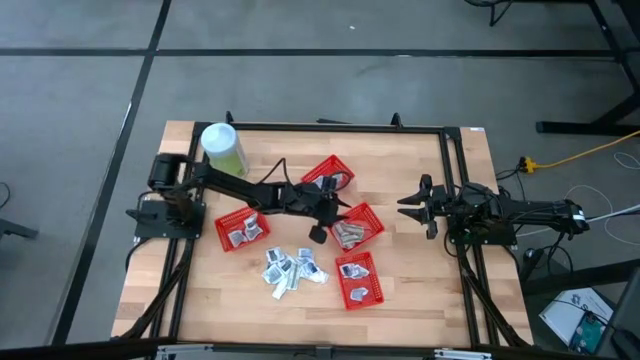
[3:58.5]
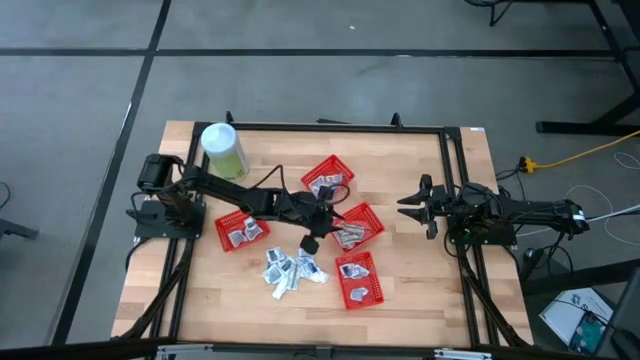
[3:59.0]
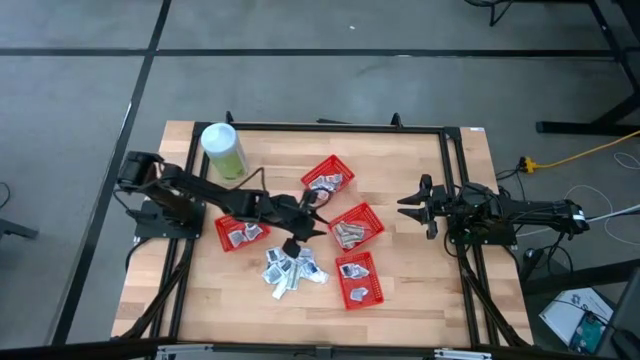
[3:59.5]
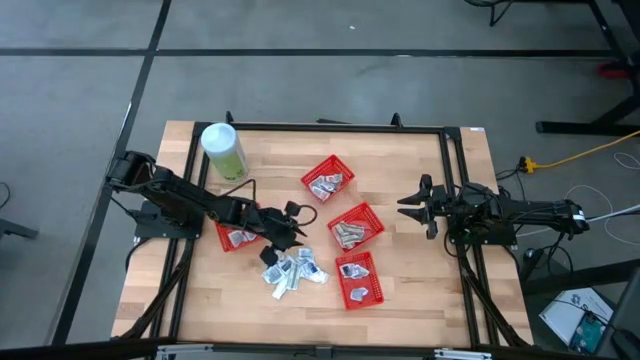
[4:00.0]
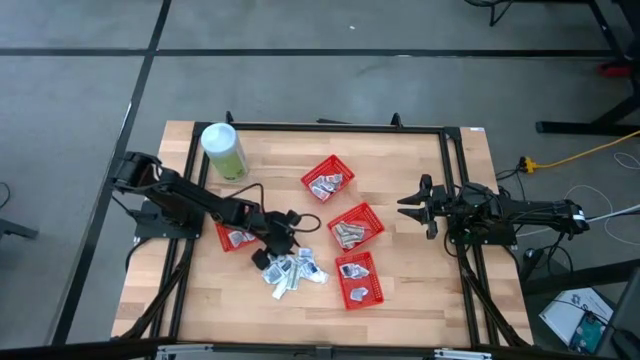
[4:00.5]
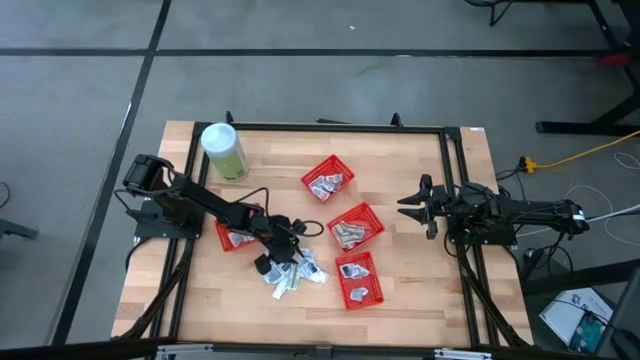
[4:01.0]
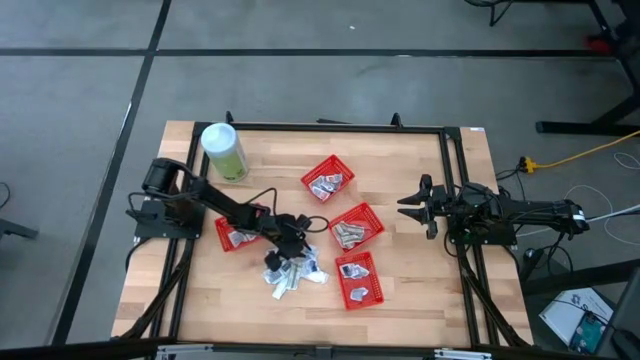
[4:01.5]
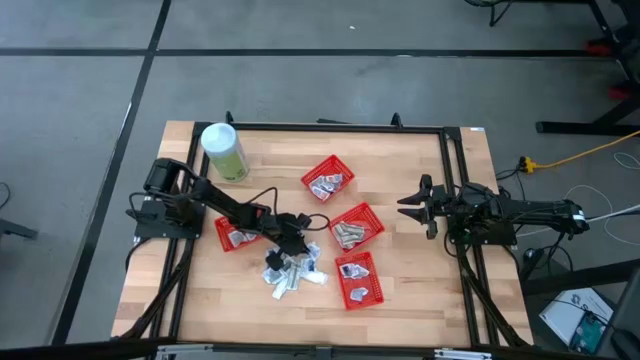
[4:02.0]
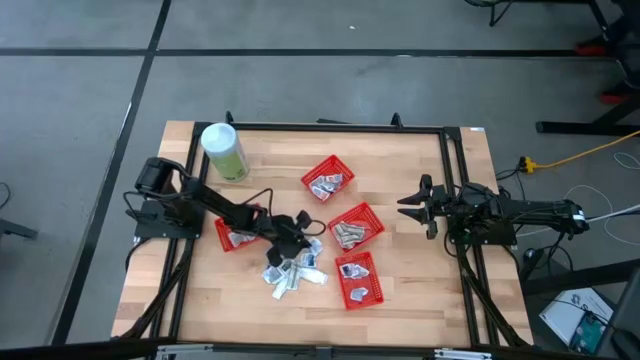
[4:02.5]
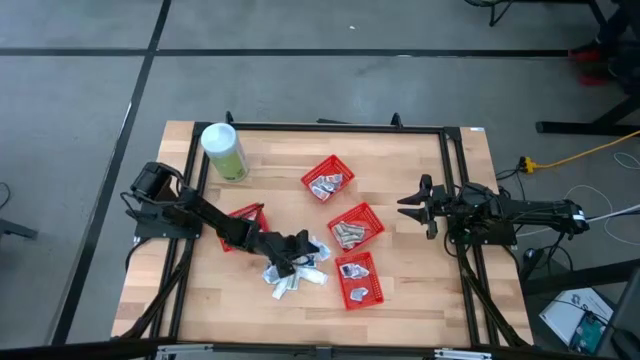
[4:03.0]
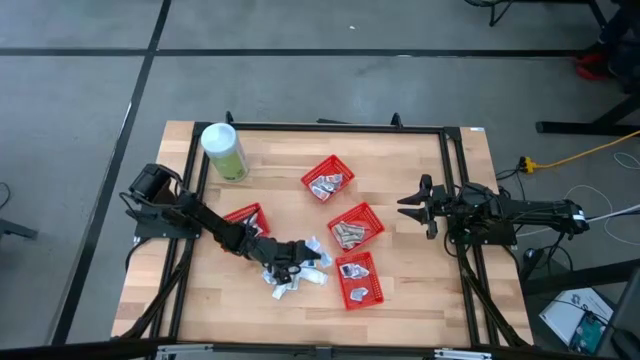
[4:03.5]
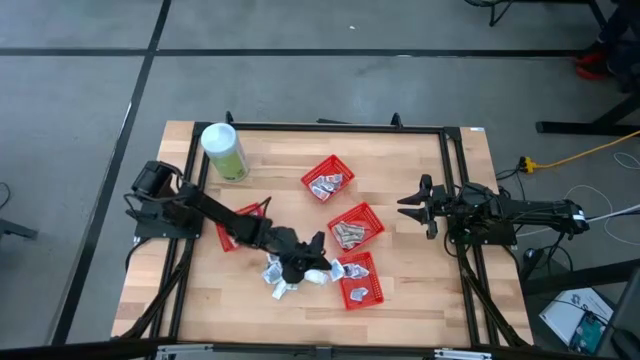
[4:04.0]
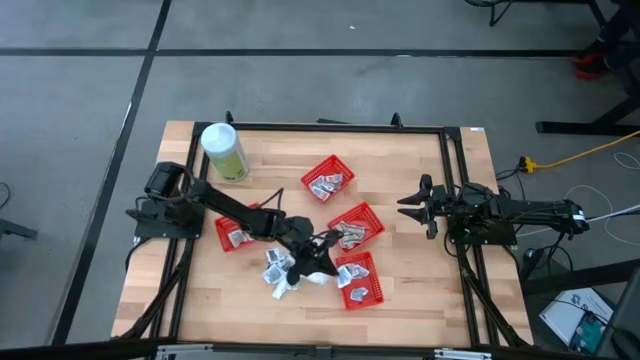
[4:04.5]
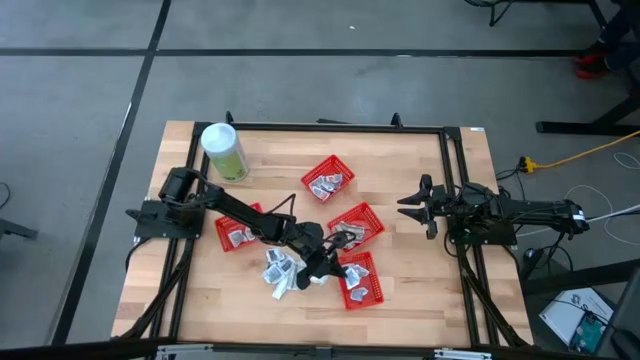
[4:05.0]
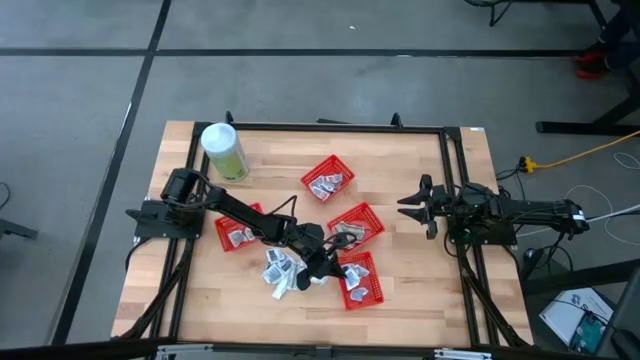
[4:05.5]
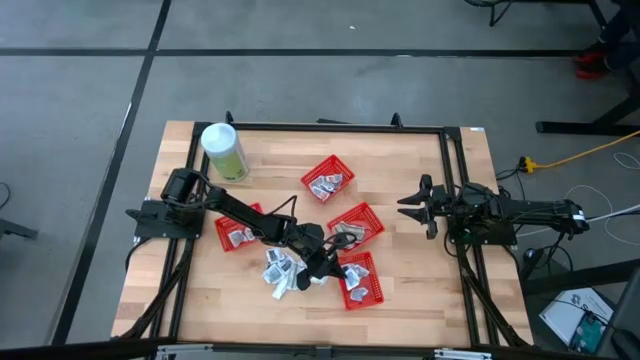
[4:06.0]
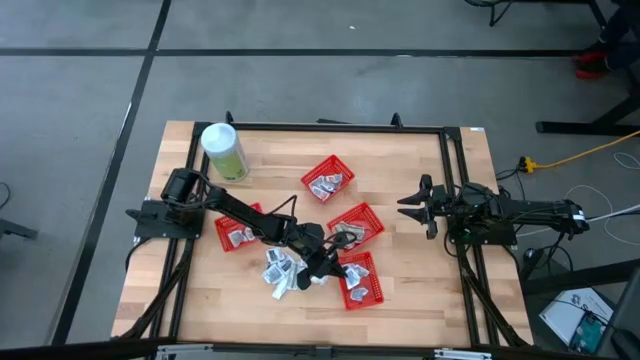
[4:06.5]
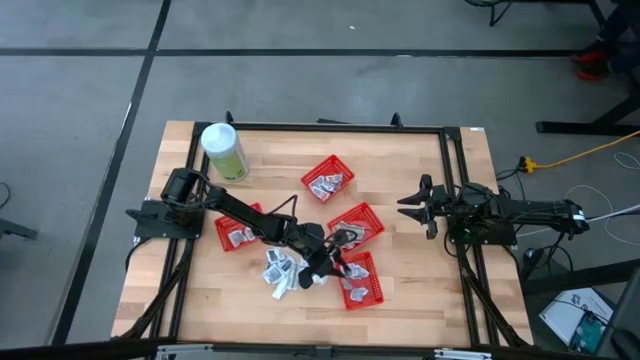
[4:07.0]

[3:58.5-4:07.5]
Task: Pick & Place First Aid Supplies
Put the blue alcohol pad into the red container

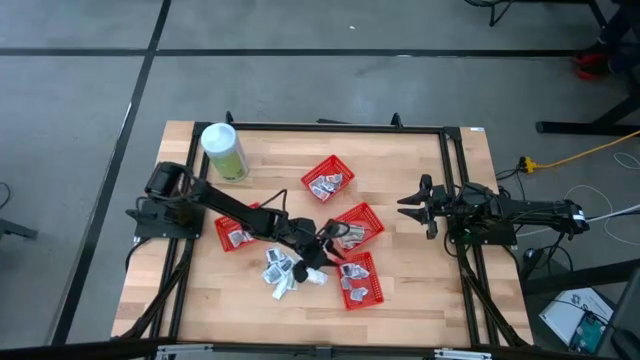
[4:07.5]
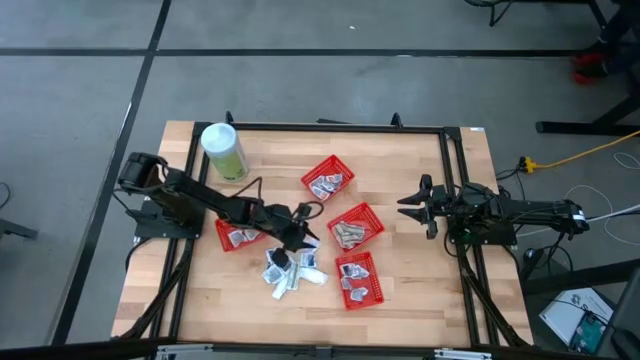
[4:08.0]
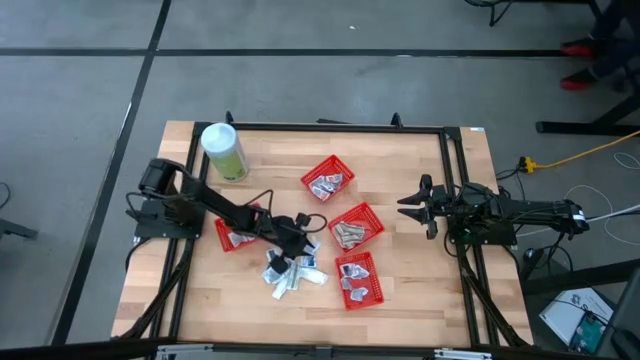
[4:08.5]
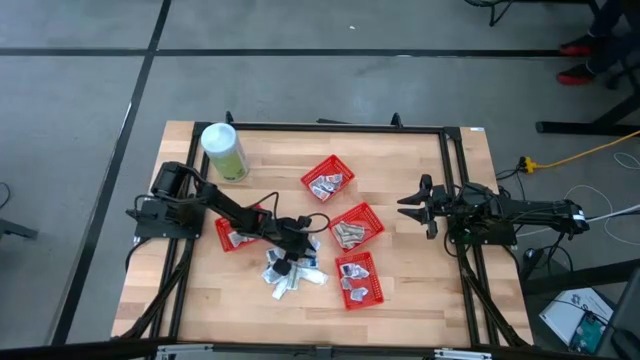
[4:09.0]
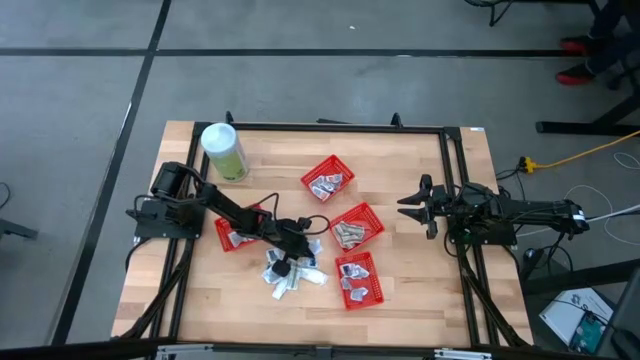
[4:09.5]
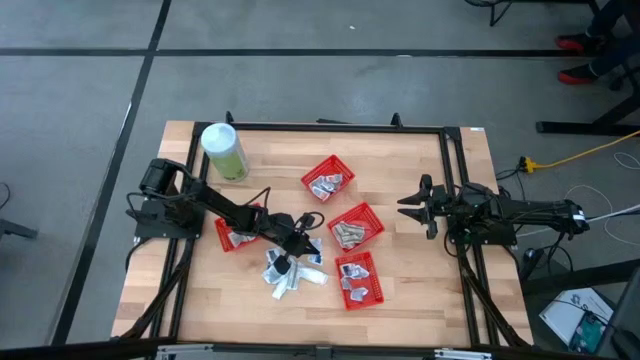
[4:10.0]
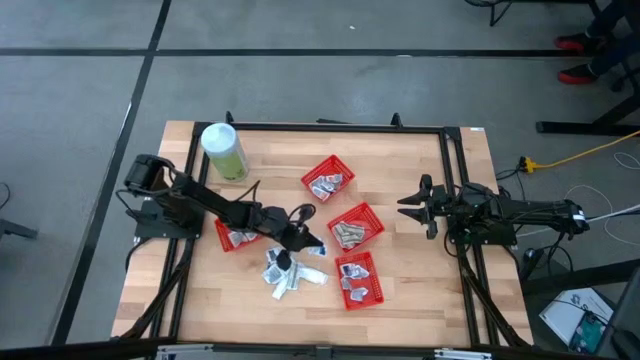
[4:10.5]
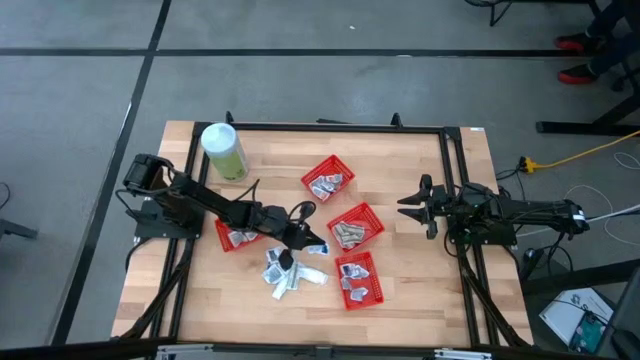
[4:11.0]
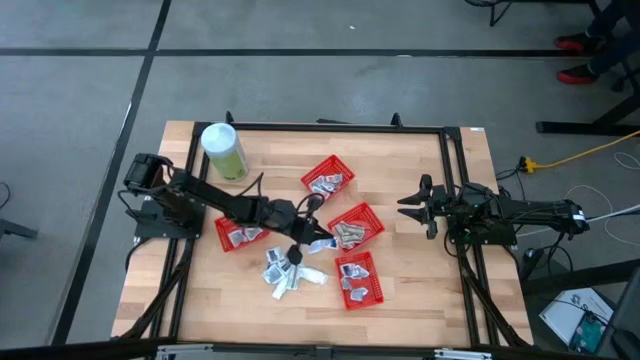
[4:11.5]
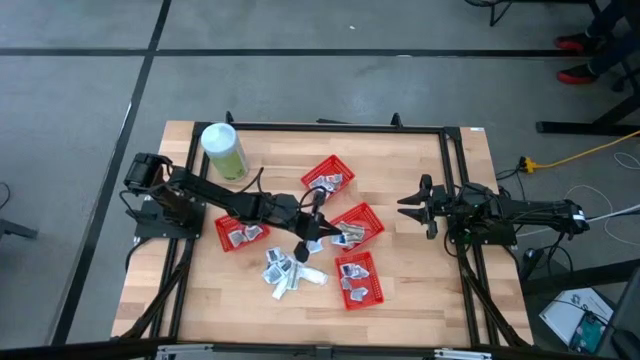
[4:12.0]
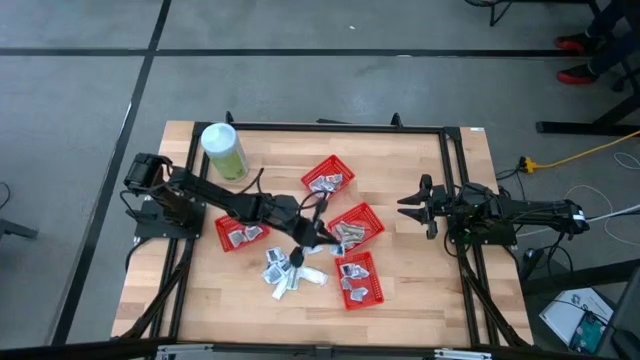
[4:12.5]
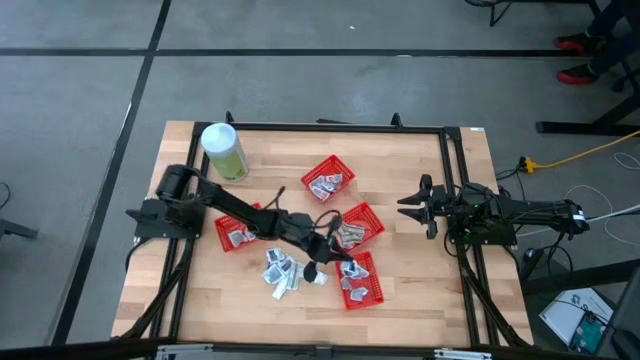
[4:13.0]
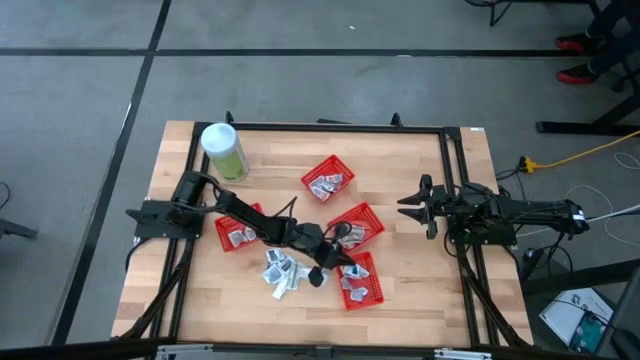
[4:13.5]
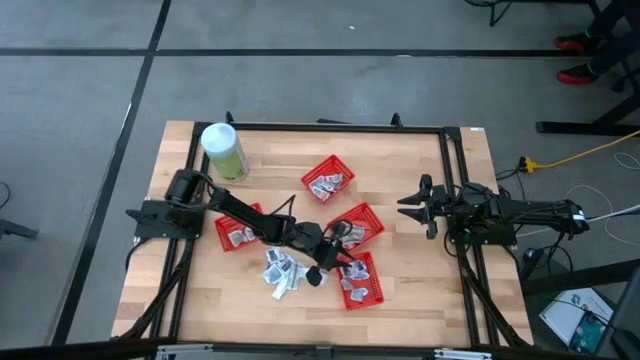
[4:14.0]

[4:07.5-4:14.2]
Put the blue alcohol pad into the red container

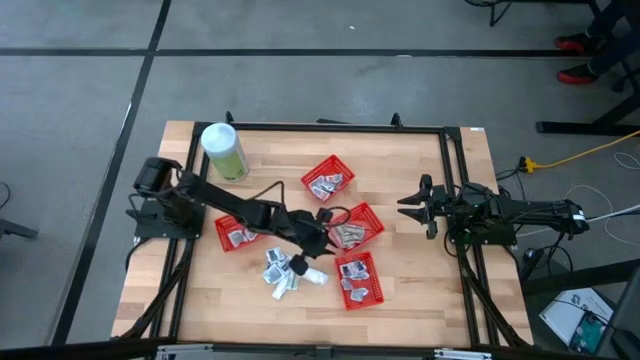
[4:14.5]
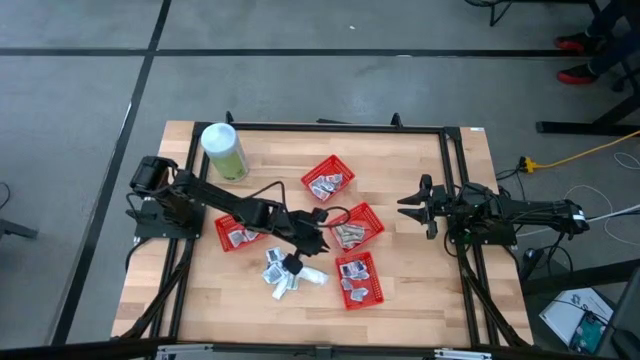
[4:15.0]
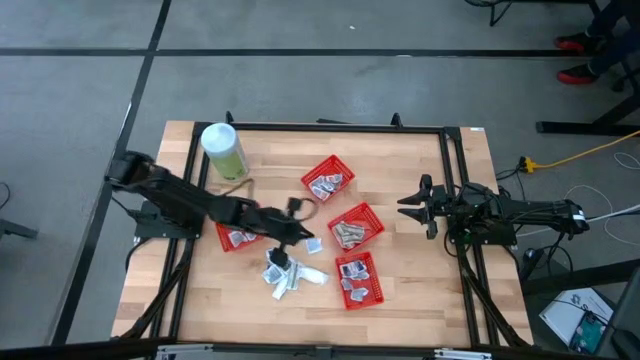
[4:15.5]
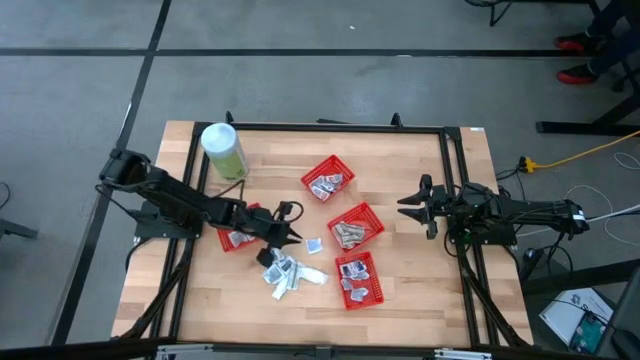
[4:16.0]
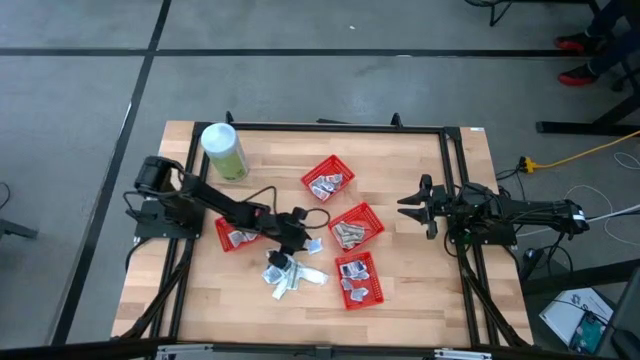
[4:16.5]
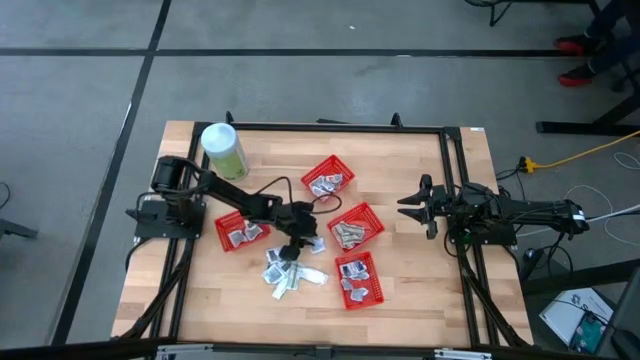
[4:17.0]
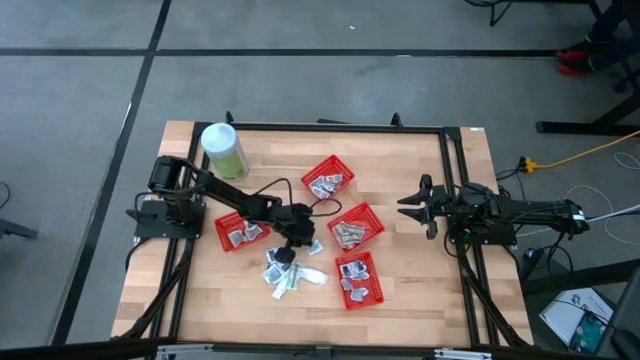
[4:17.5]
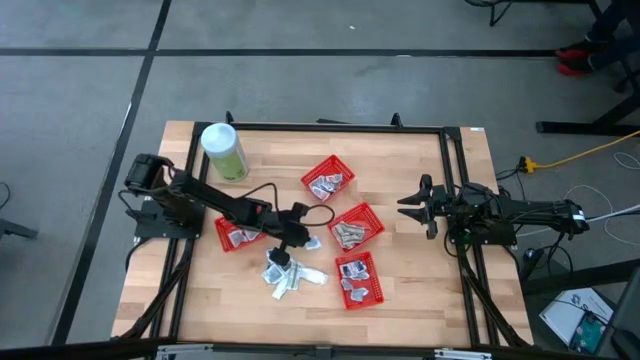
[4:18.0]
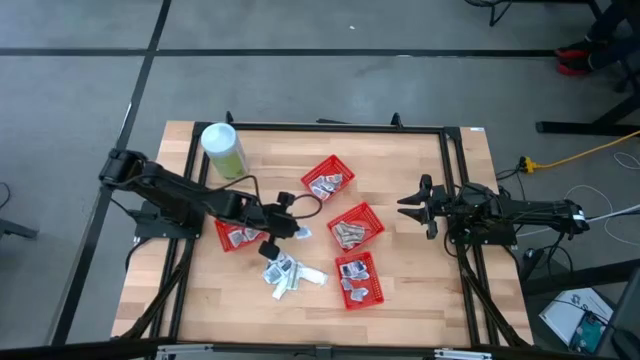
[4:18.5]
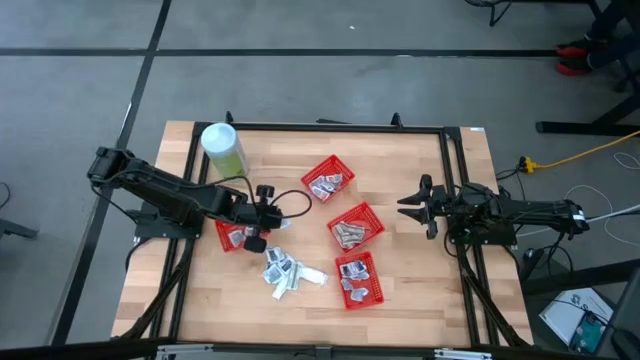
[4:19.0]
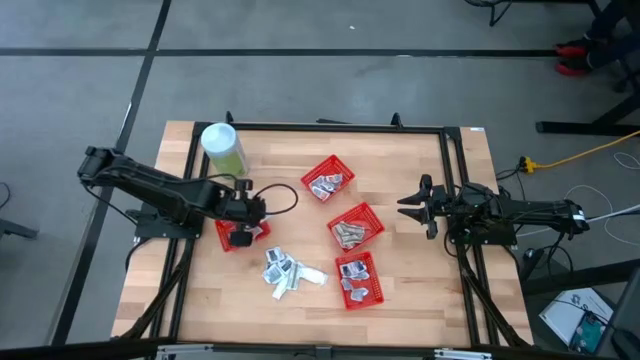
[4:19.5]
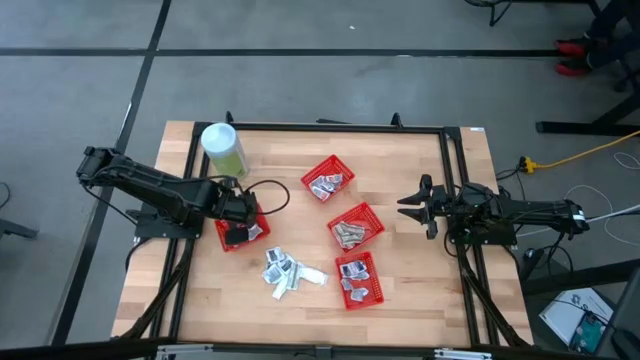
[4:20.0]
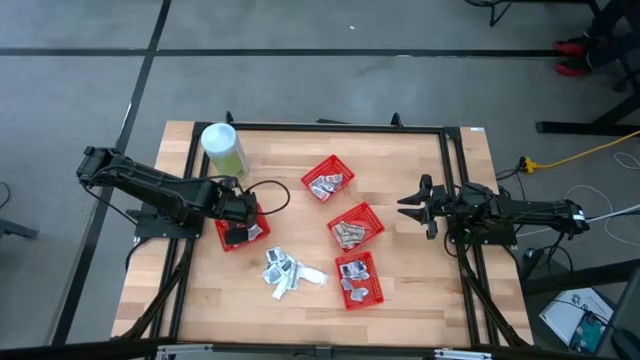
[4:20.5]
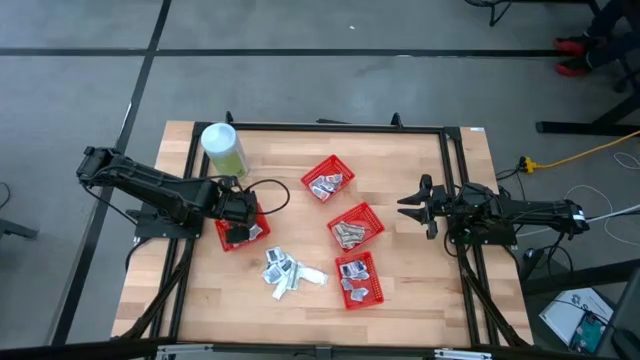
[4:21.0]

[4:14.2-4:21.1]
Put the gray towelette pack into the red container
